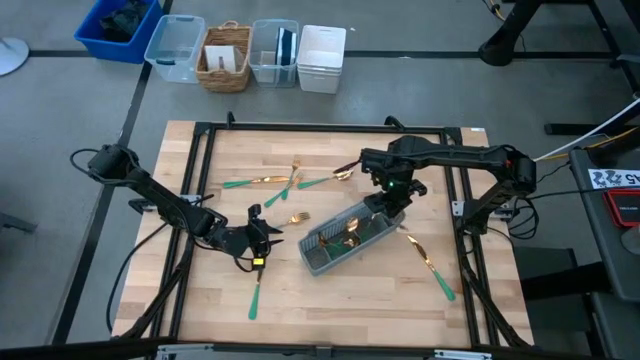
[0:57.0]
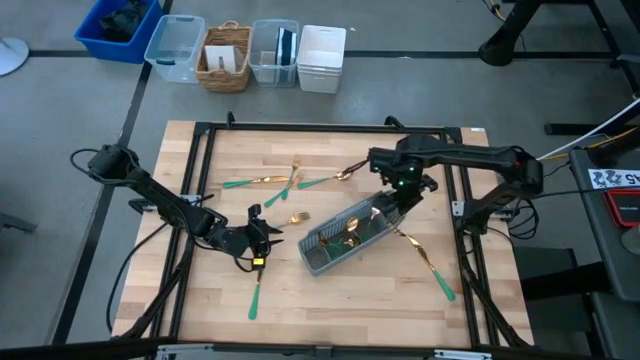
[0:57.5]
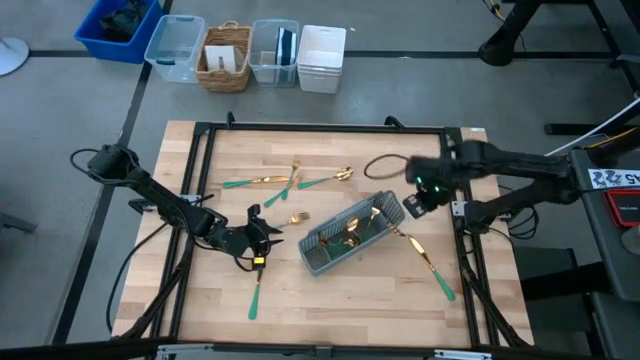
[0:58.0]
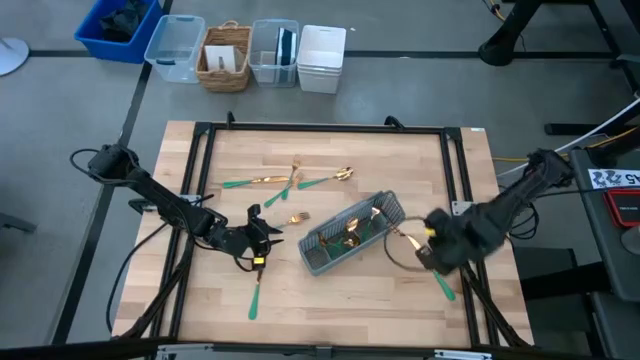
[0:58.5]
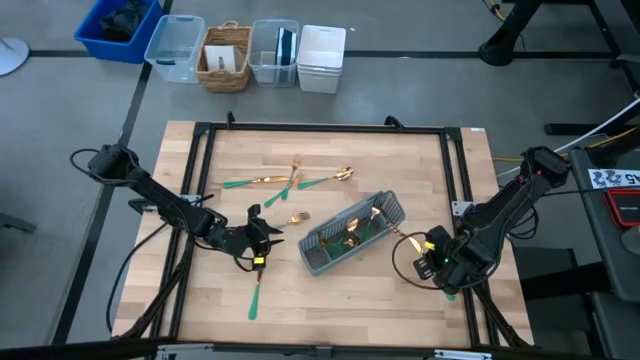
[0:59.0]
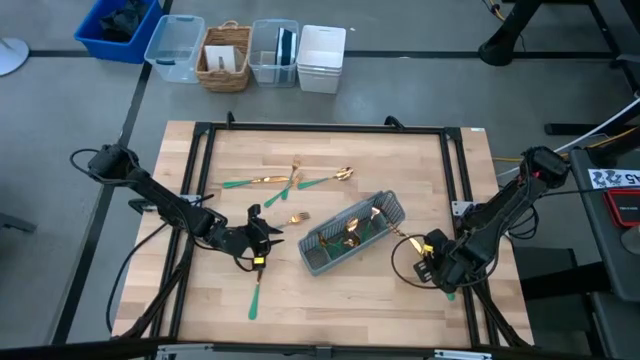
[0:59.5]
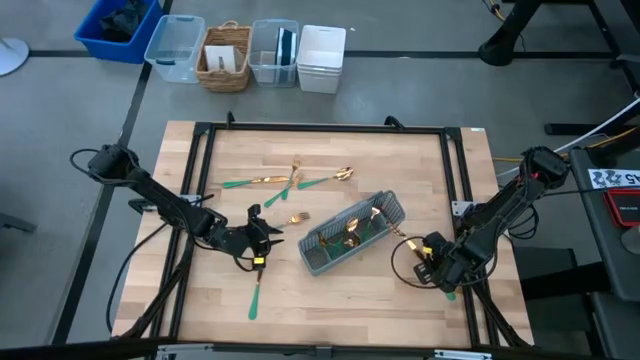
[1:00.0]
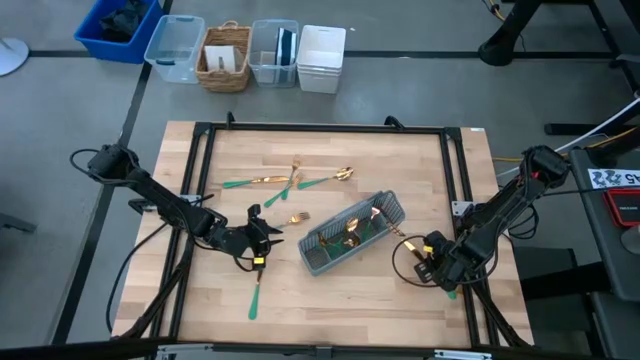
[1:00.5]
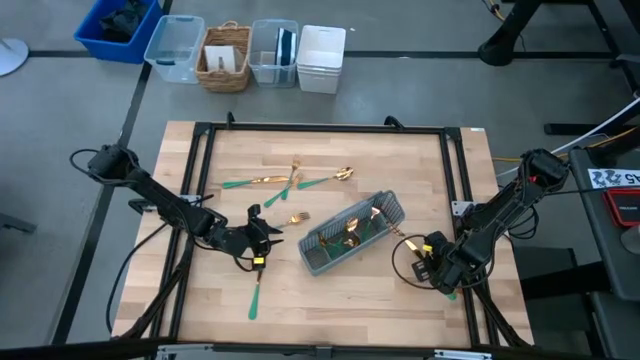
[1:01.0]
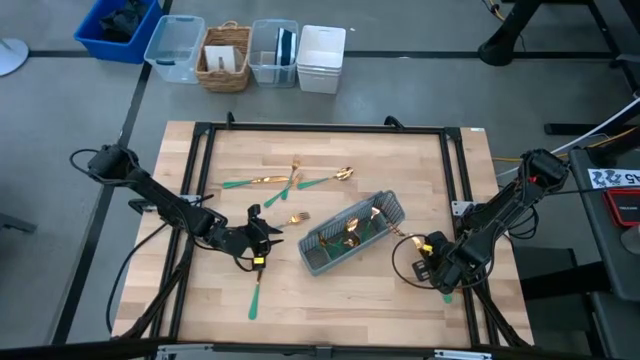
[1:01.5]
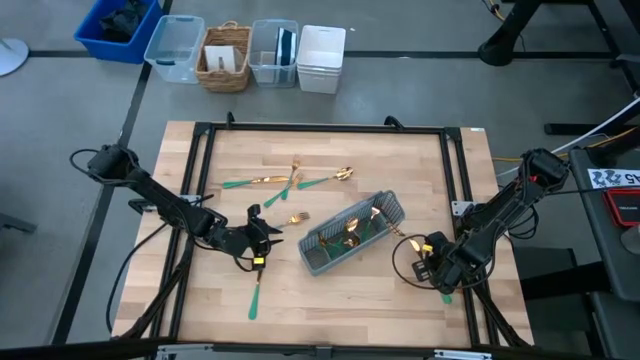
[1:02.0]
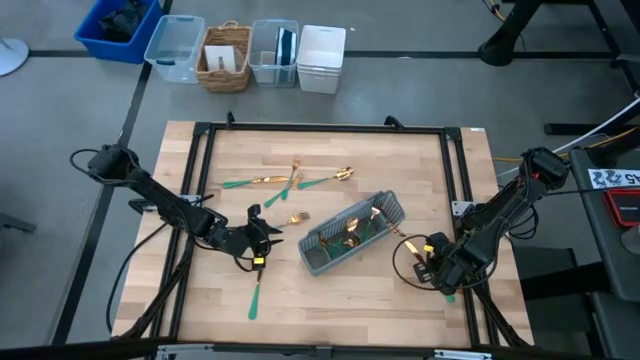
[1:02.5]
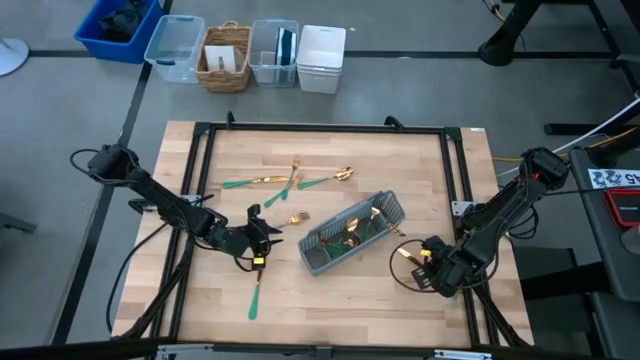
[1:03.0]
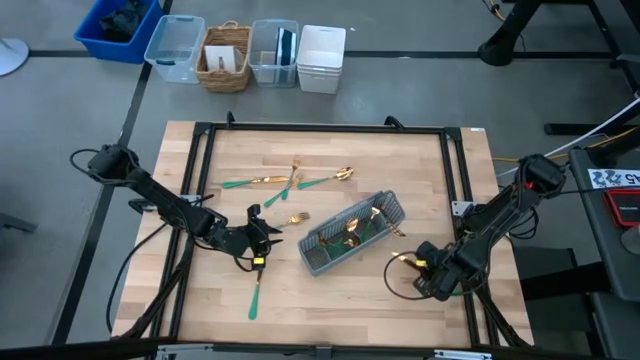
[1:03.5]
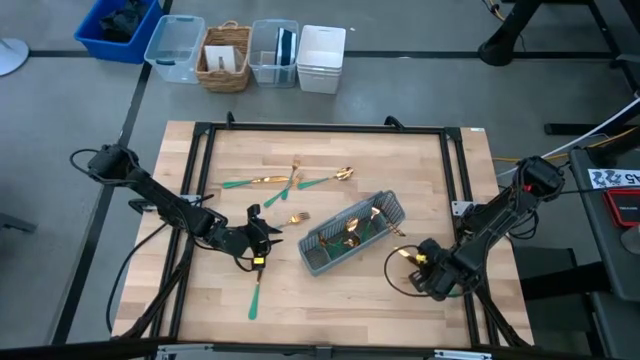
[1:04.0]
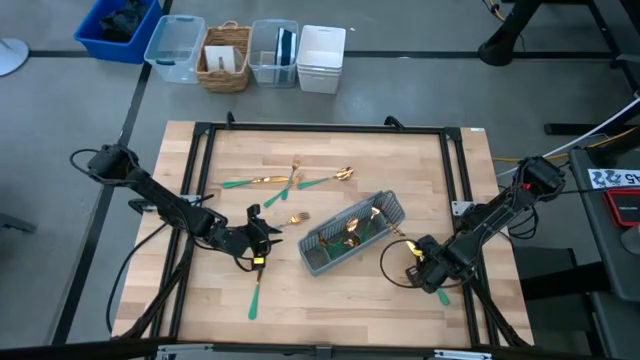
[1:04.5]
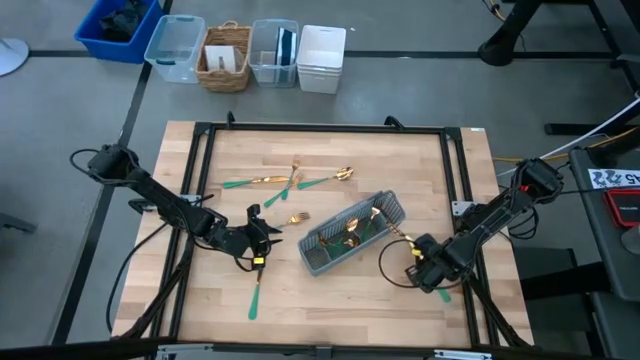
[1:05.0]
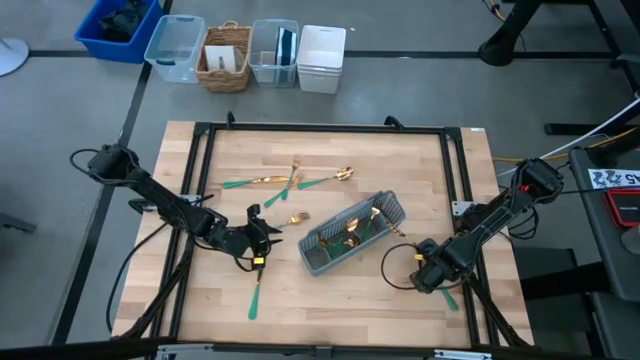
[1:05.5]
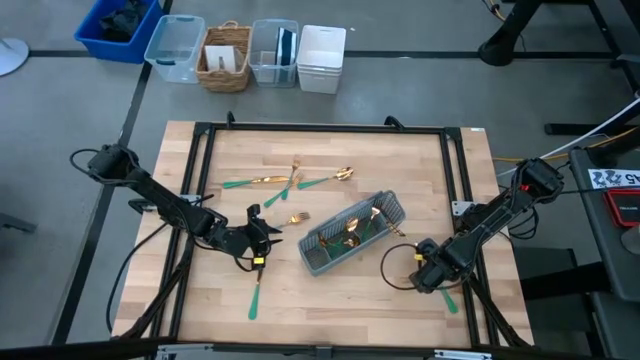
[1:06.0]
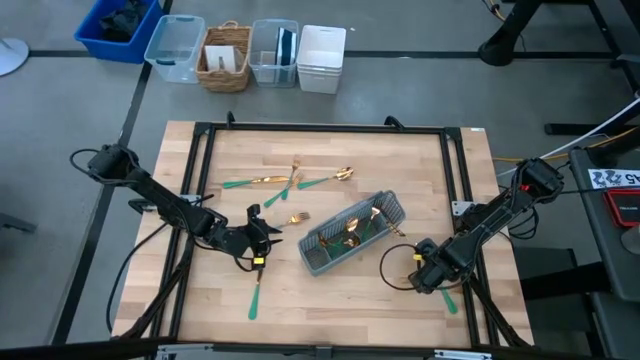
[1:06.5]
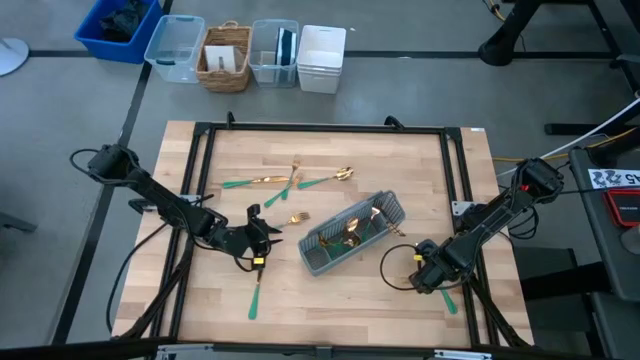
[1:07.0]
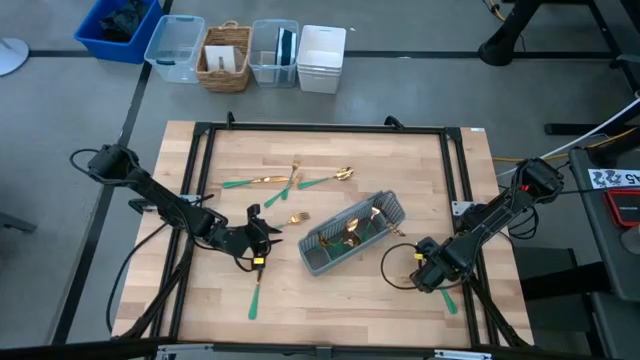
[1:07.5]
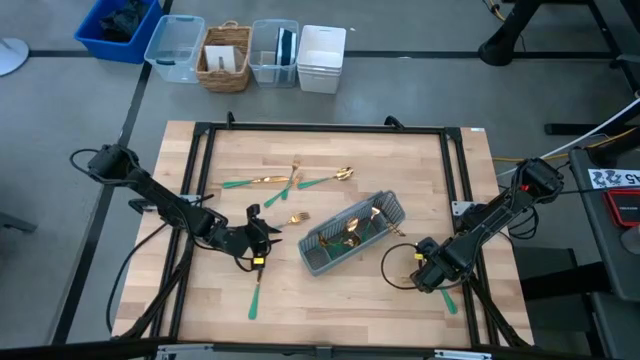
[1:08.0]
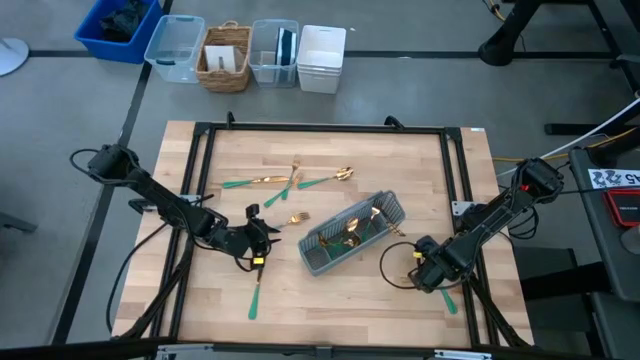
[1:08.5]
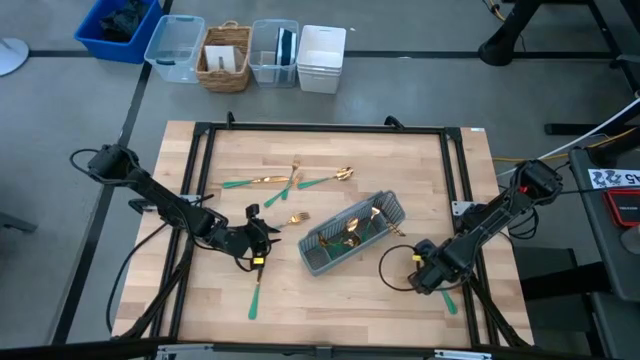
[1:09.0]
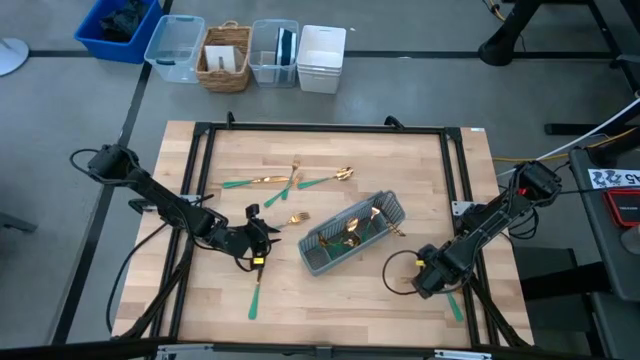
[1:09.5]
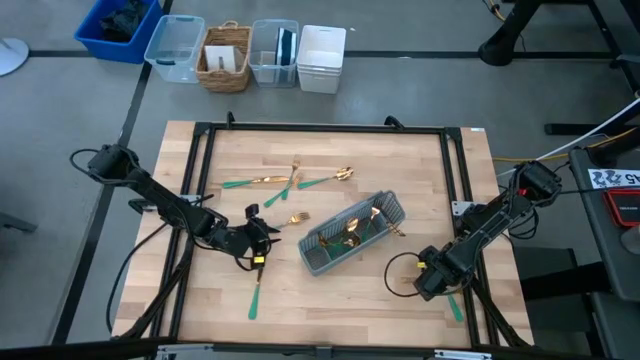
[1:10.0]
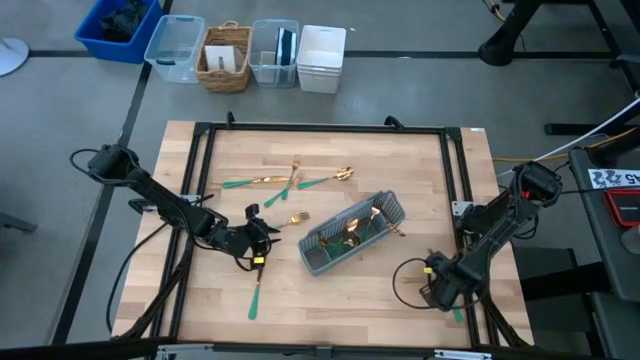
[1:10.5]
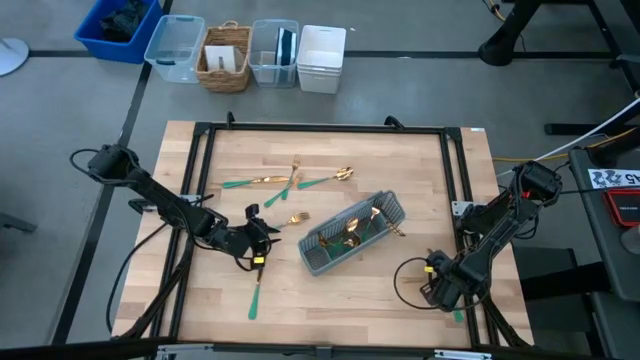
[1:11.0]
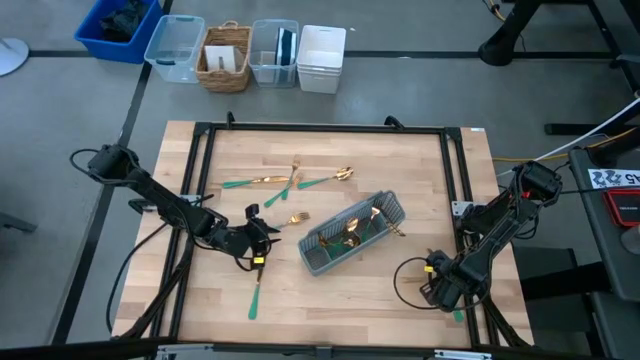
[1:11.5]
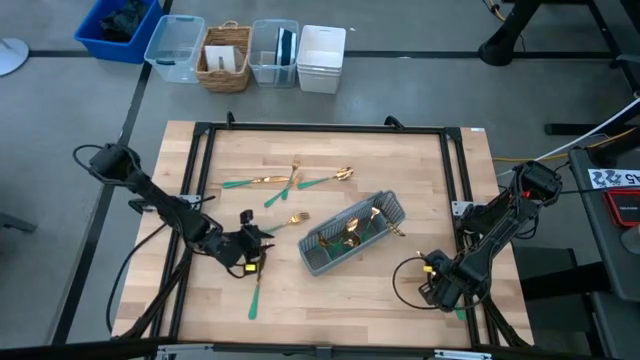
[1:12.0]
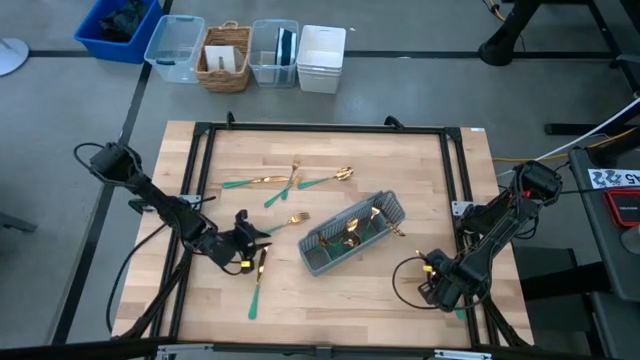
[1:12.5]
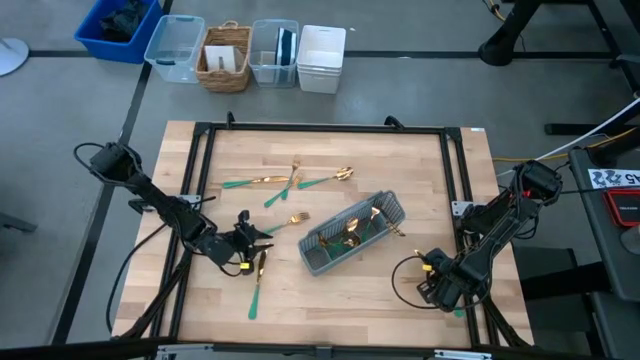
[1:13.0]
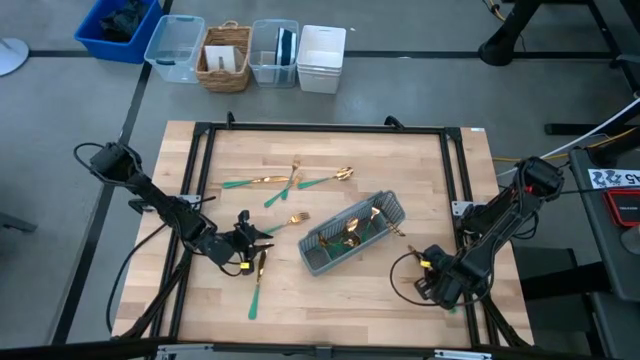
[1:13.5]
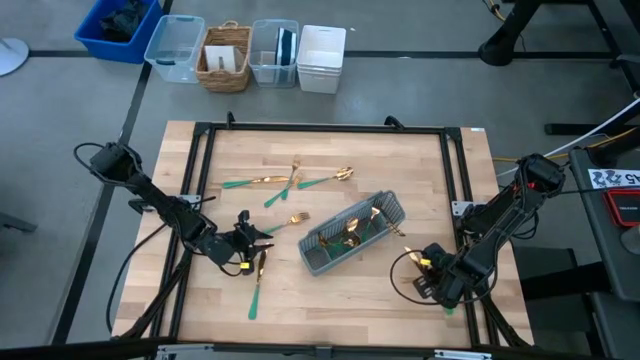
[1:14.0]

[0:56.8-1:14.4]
Task: Sort silverware
Put the gold knife into the gray silverware organizer

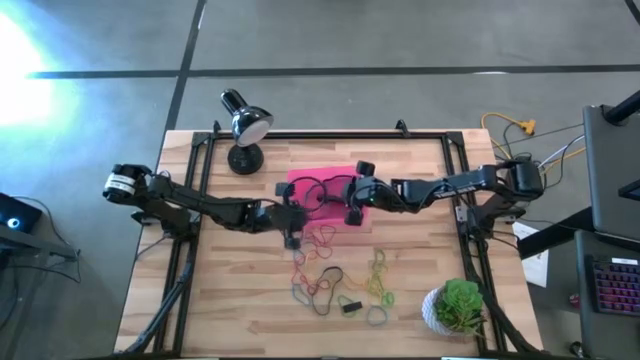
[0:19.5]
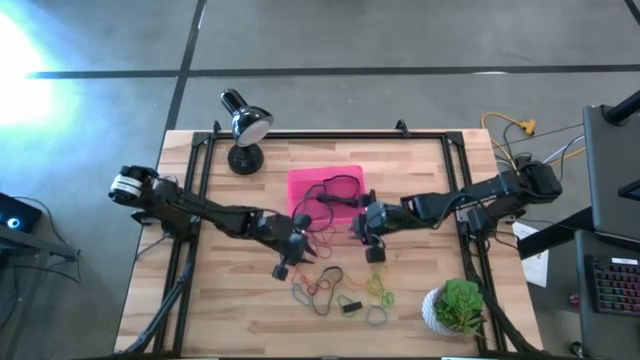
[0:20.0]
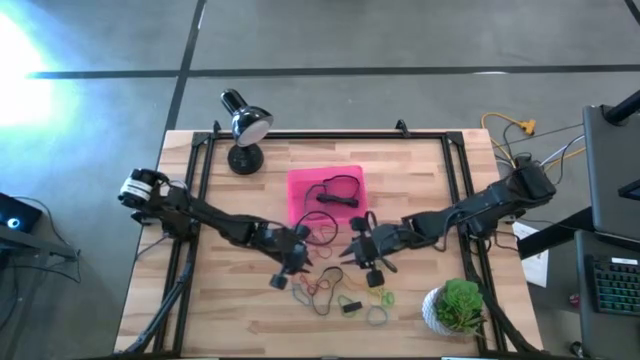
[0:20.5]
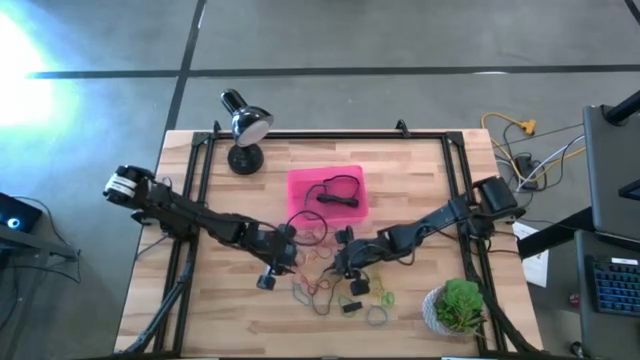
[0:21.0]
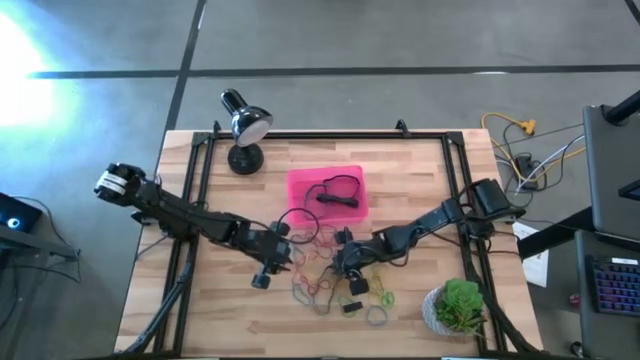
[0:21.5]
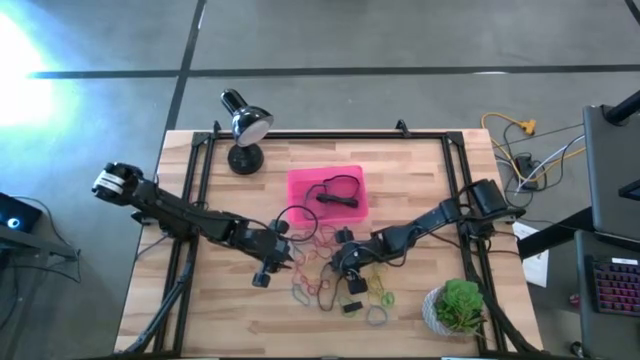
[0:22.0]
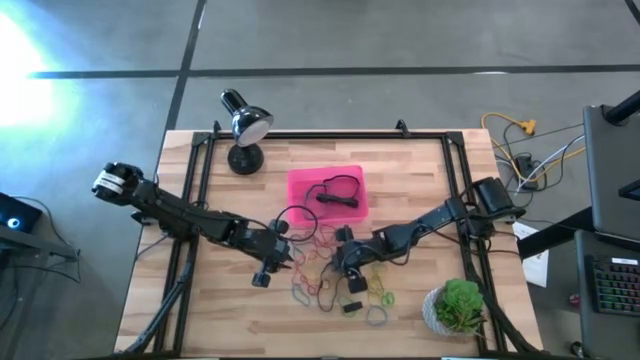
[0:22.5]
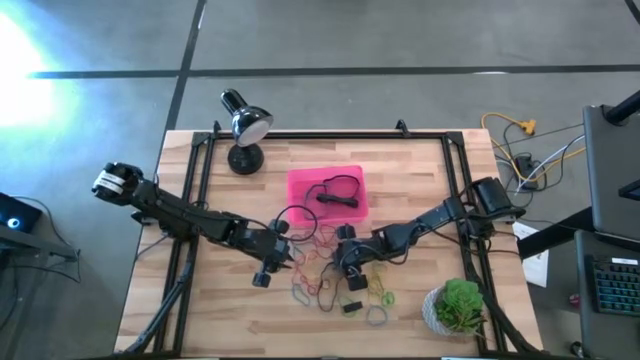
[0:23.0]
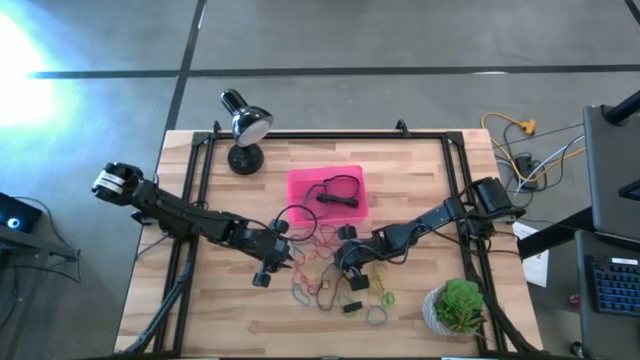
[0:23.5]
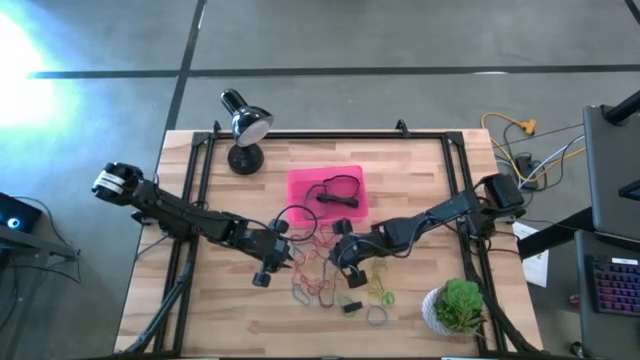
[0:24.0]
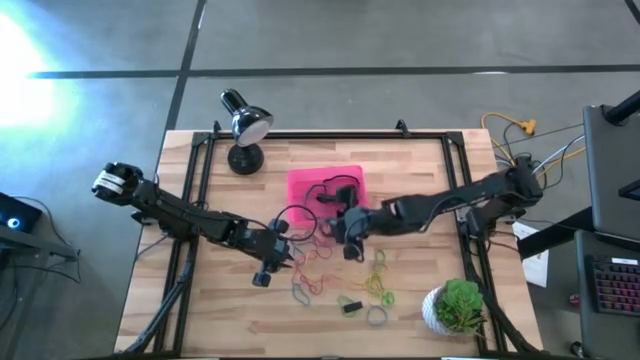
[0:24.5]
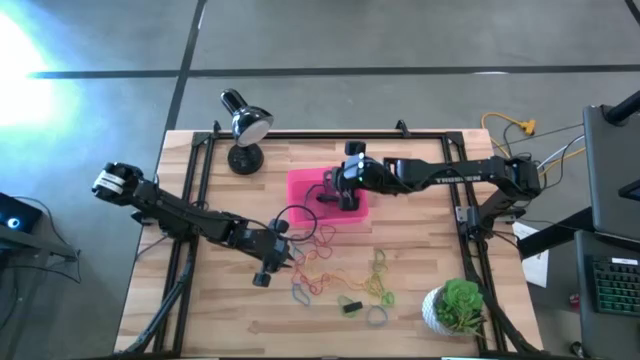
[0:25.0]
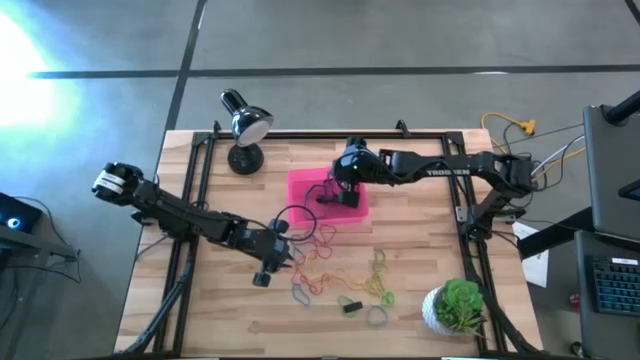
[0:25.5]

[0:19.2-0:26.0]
Task: Pick and place rubber bands into bin
Put the black rubber band into the red bin
